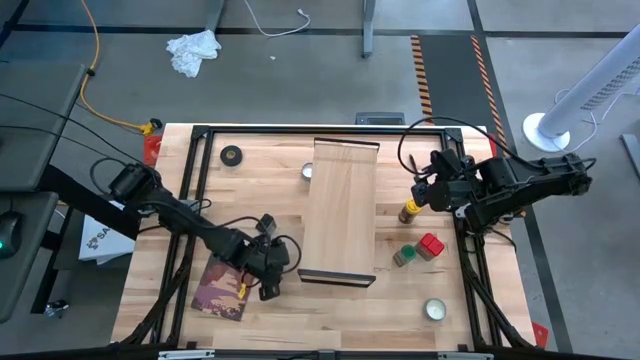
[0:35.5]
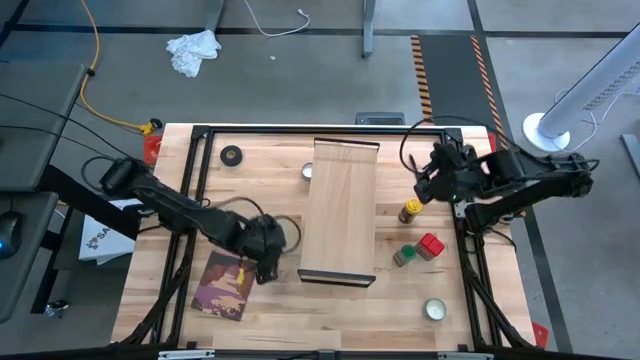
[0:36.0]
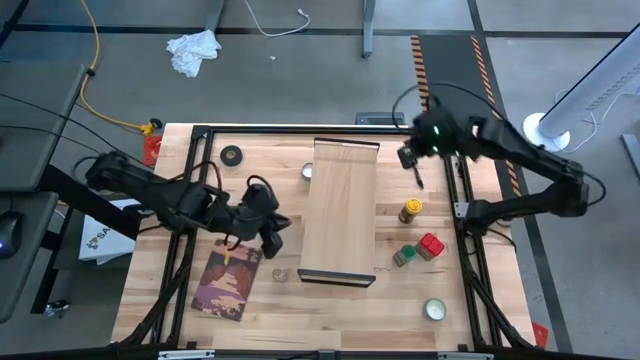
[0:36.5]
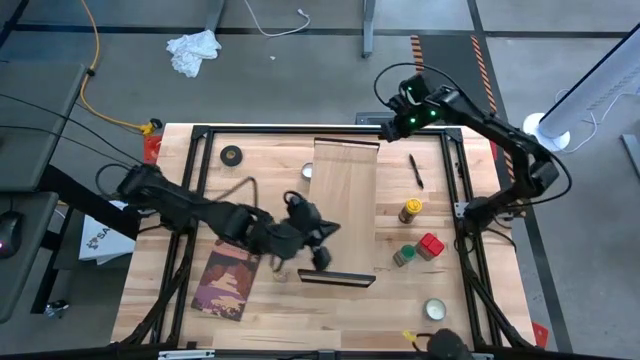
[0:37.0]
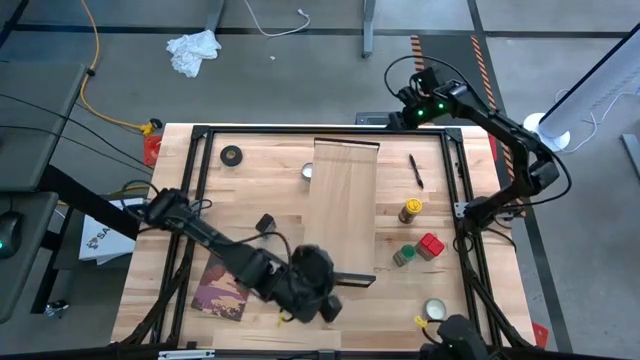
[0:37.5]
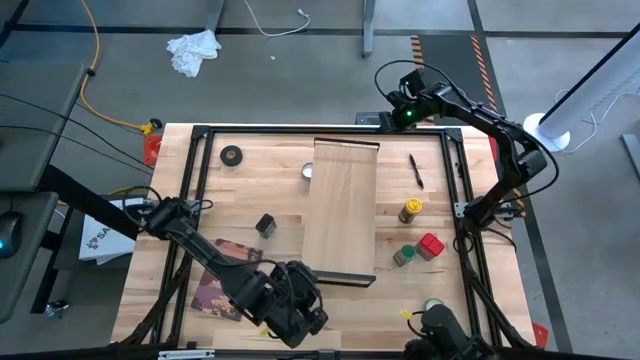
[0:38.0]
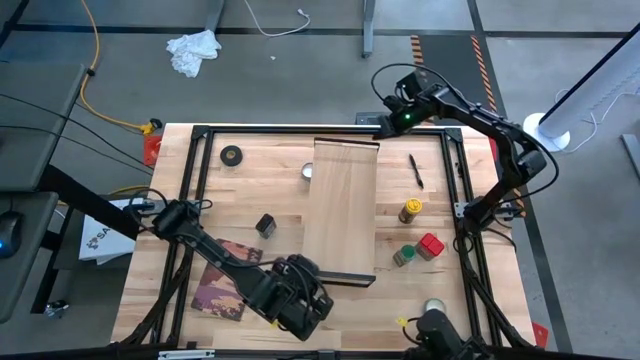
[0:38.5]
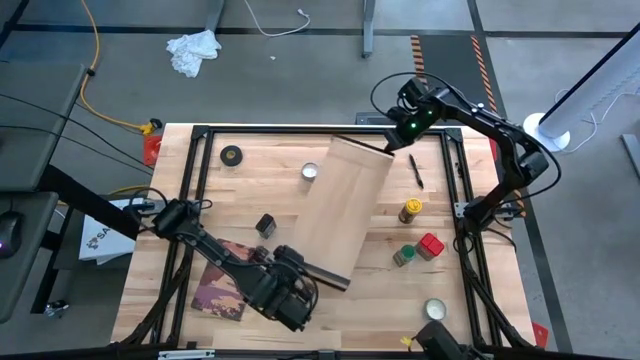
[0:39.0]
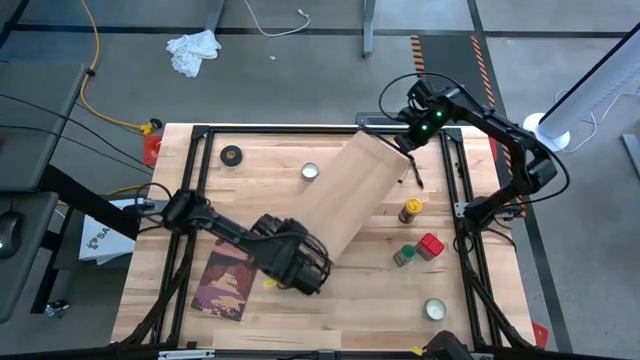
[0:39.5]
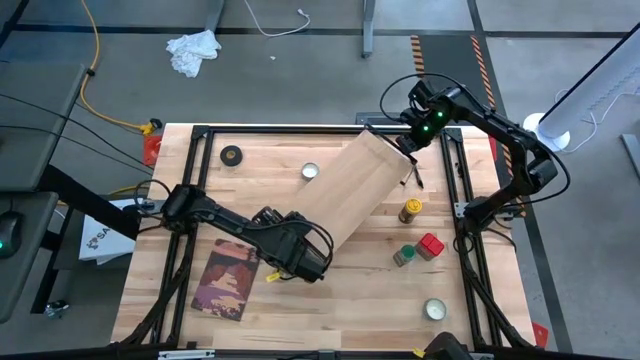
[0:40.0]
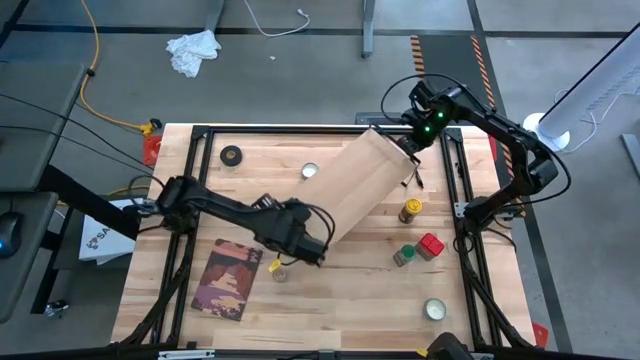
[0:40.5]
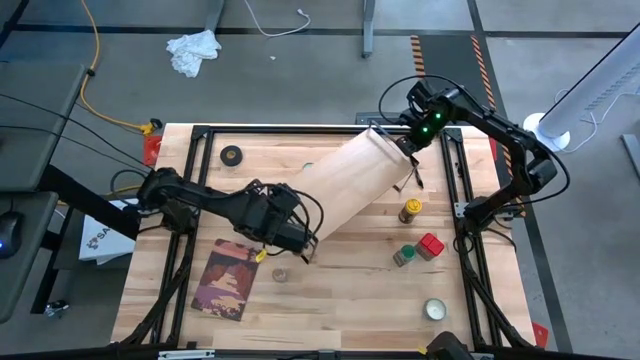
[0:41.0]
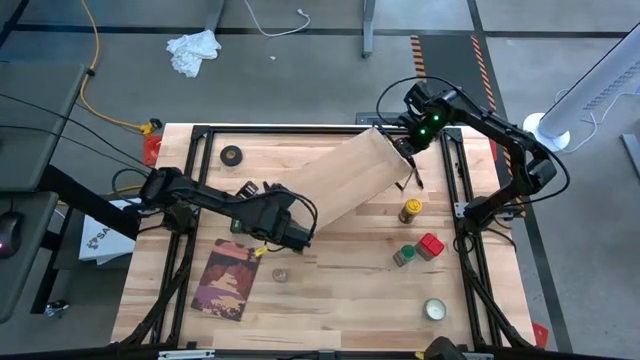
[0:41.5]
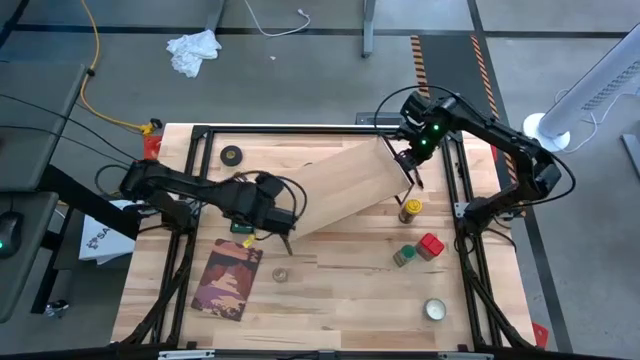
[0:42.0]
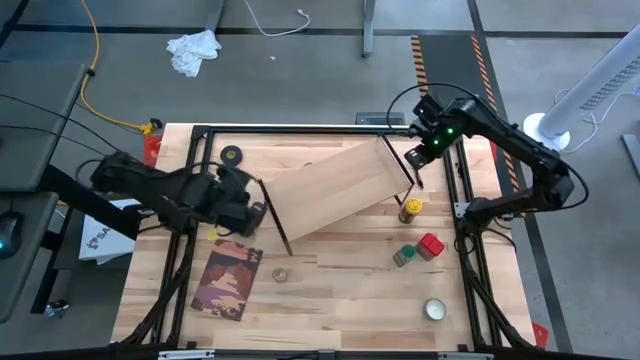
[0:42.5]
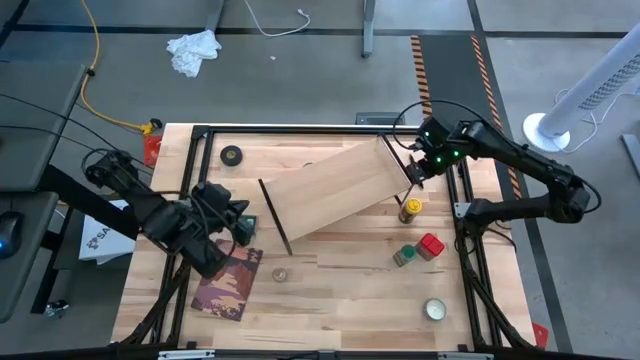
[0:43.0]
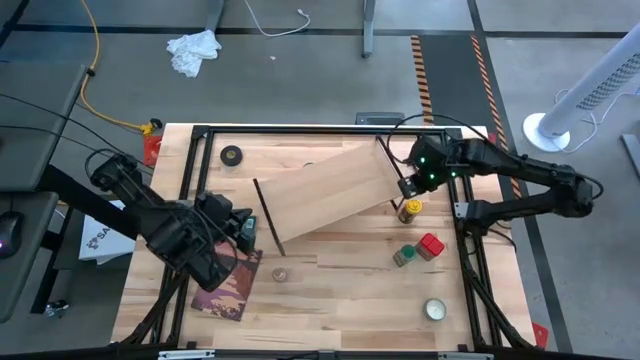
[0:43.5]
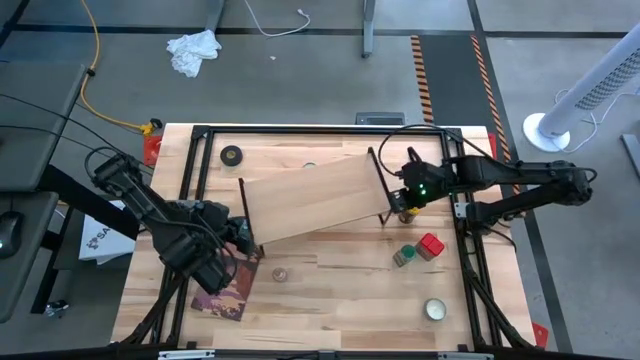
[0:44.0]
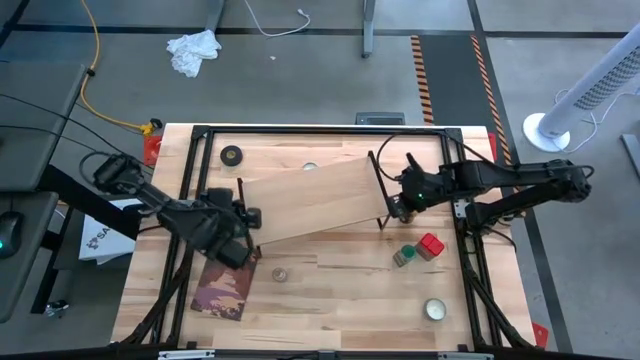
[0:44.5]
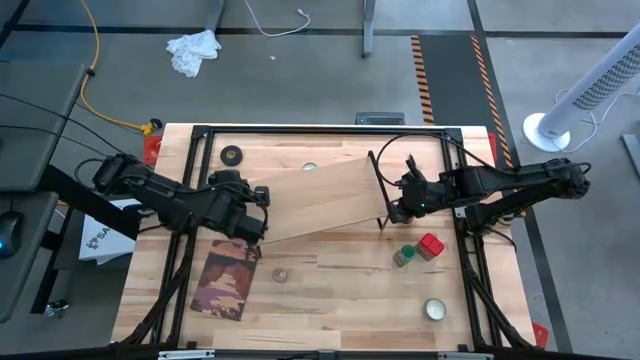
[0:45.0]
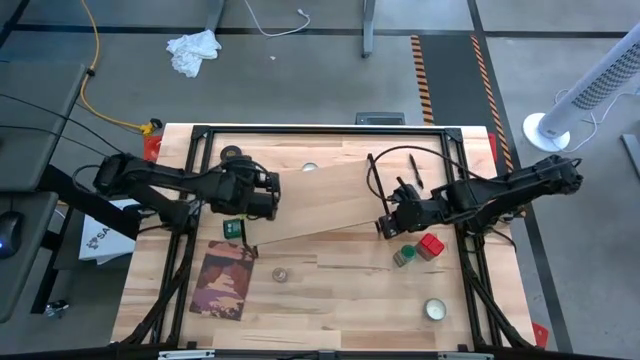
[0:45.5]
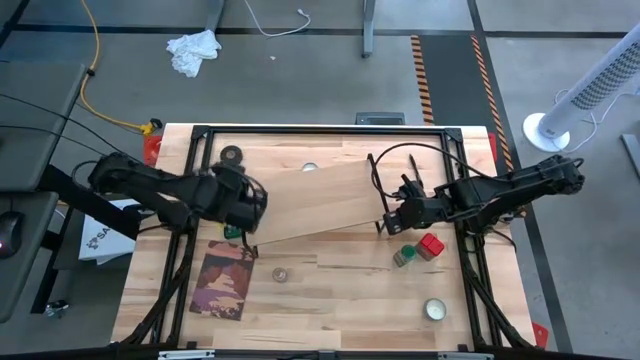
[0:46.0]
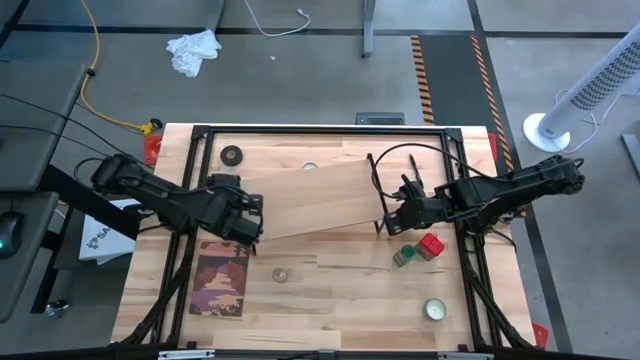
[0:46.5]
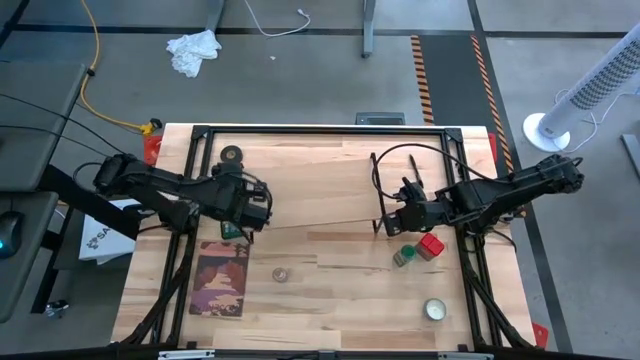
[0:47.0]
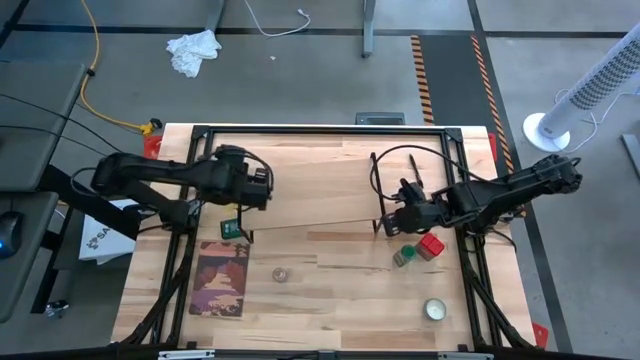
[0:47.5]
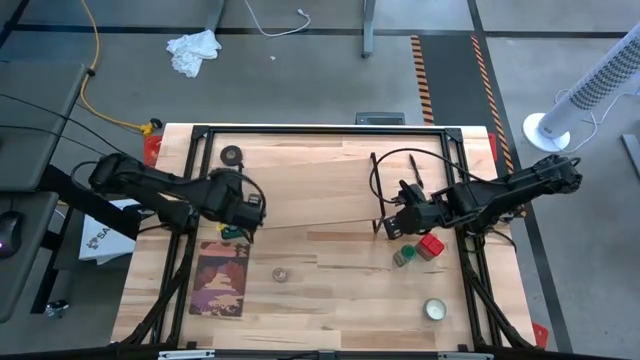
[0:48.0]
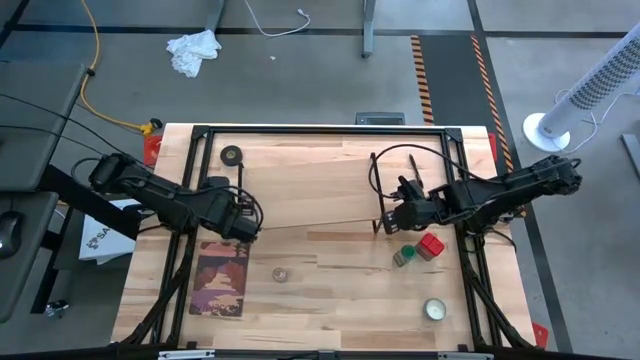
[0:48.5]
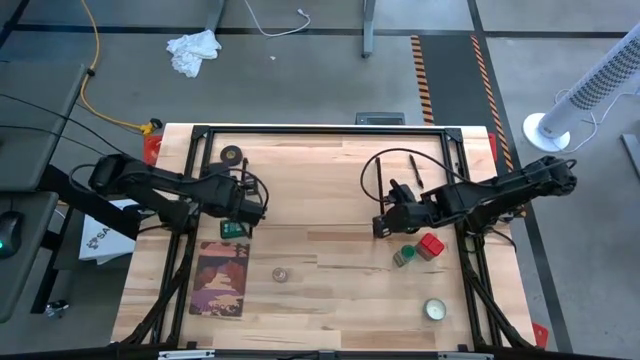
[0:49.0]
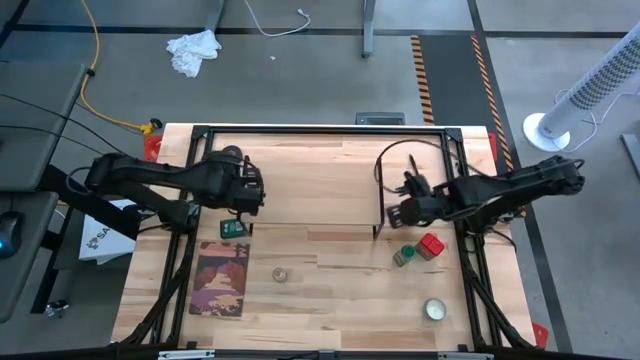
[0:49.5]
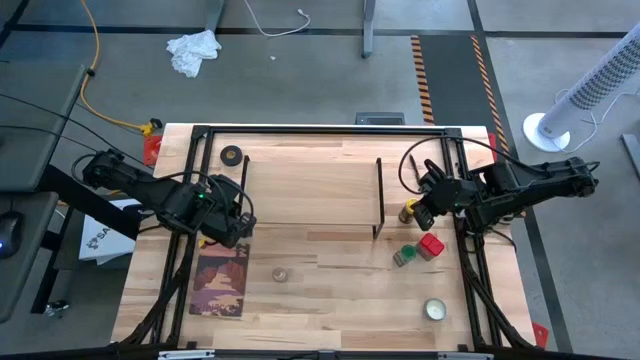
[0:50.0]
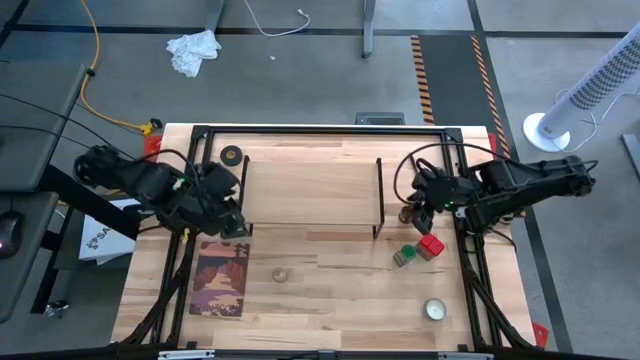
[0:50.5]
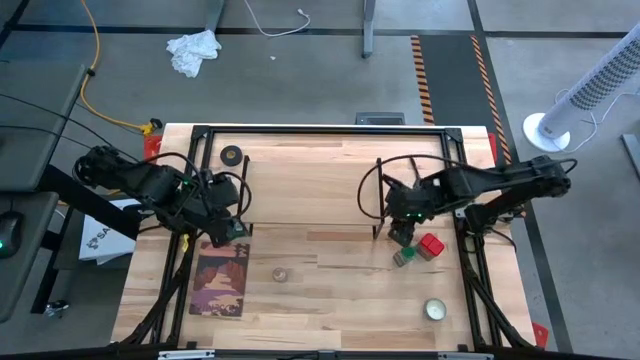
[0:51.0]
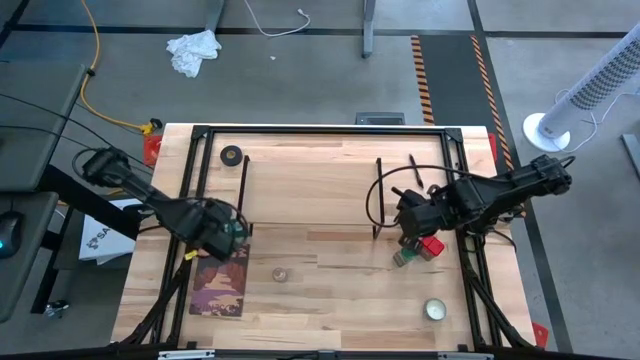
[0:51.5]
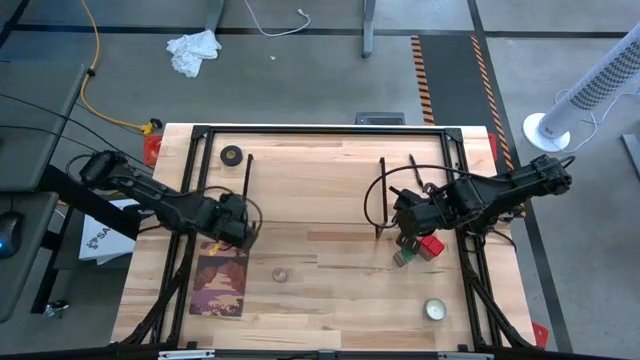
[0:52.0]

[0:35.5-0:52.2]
Task: Shelf spices
Move the shelf a quarter turn to the left on the table

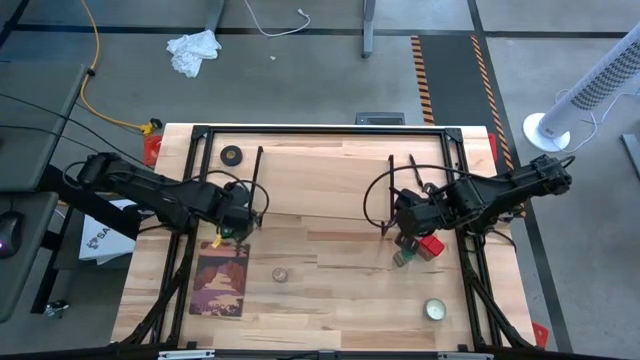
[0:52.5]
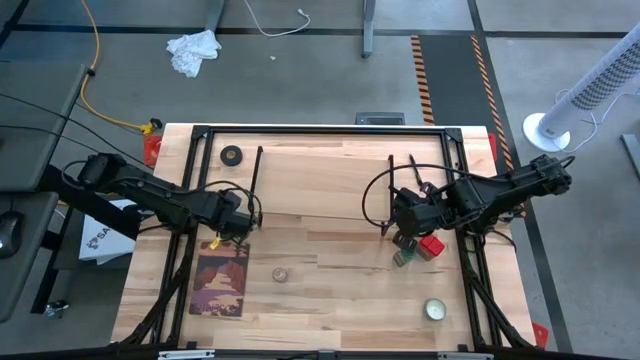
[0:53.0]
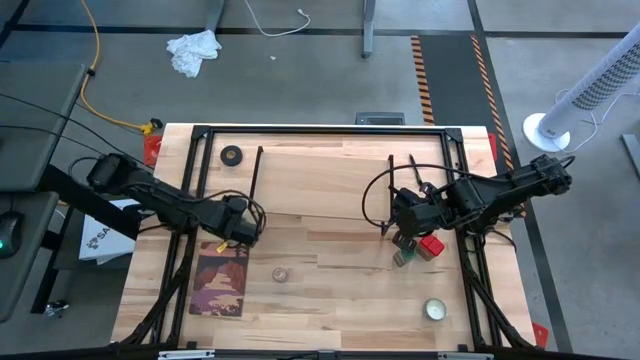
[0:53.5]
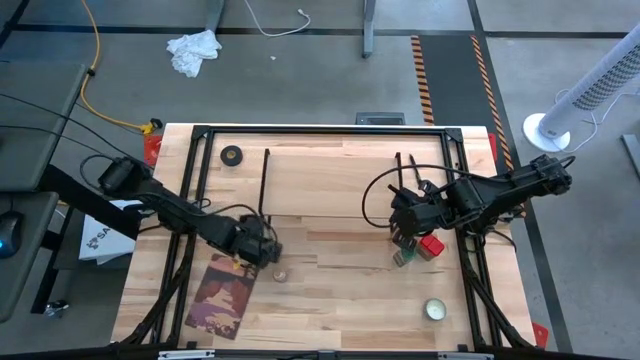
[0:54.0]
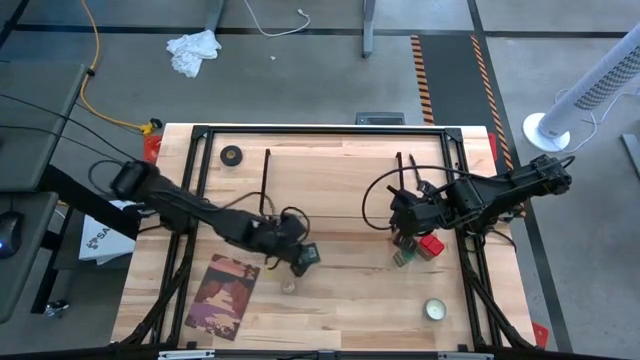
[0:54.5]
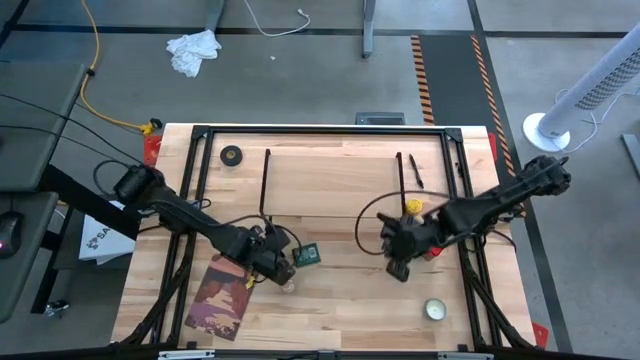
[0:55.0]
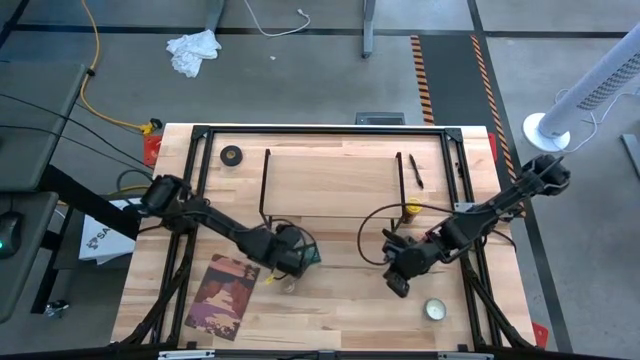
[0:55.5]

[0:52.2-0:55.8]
Move the black seasoning can to the center of the table

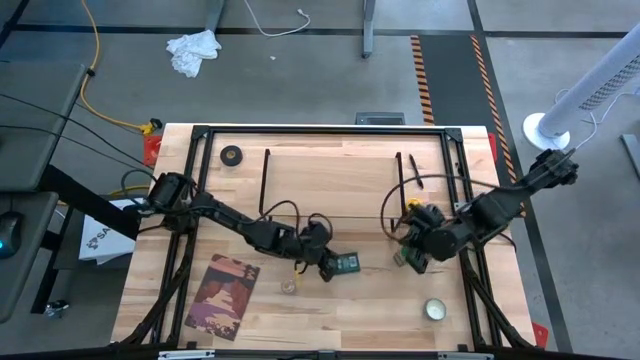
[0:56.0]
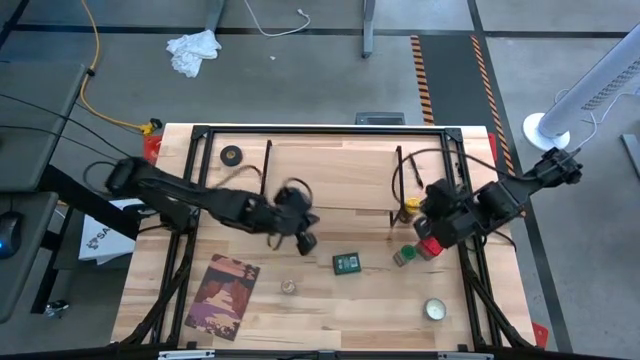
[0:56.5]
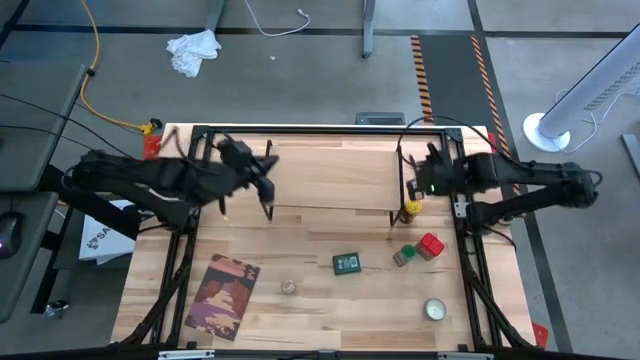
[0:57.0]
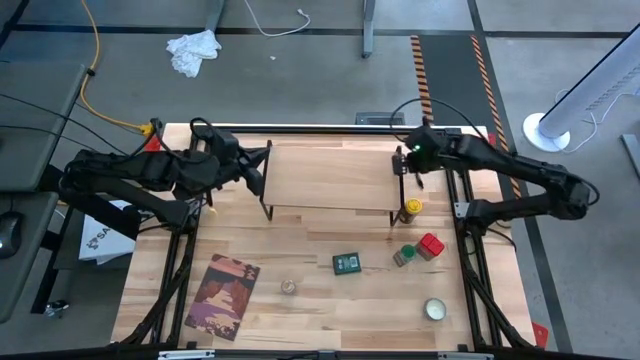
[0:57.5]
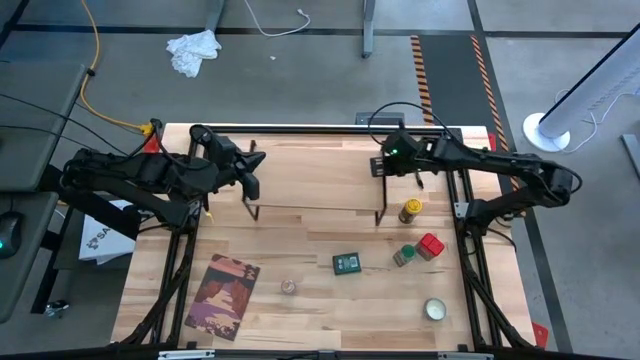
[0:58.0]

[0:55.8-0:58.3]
Adjust the shelf
